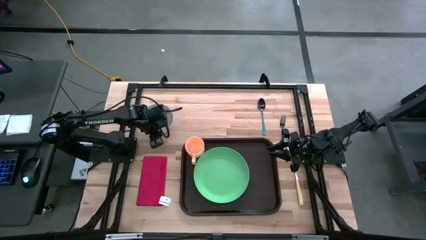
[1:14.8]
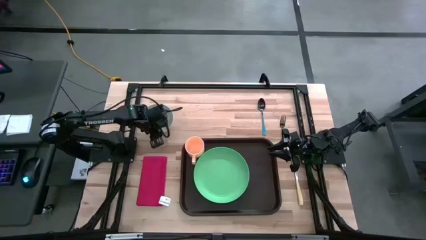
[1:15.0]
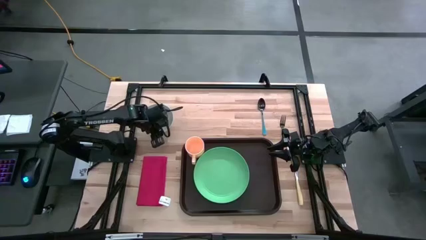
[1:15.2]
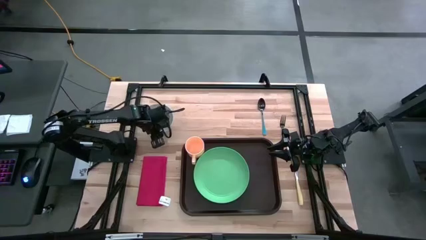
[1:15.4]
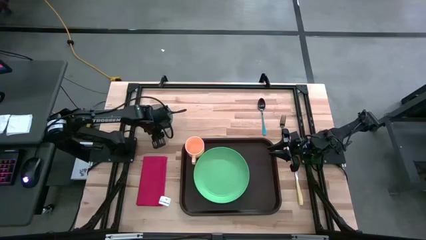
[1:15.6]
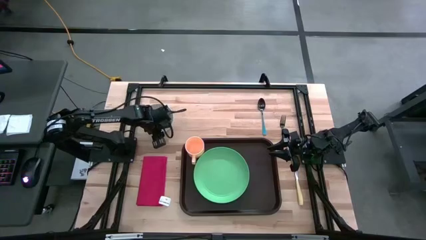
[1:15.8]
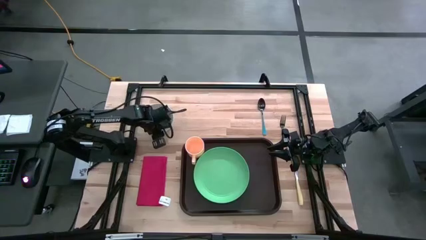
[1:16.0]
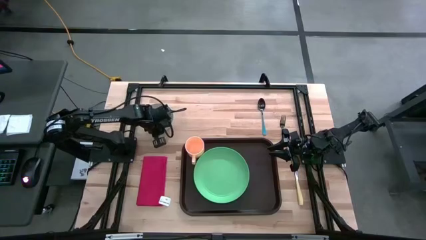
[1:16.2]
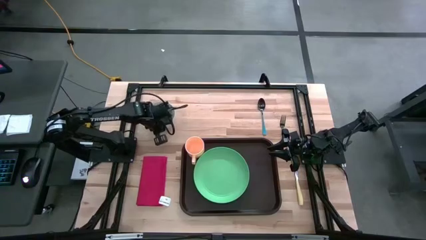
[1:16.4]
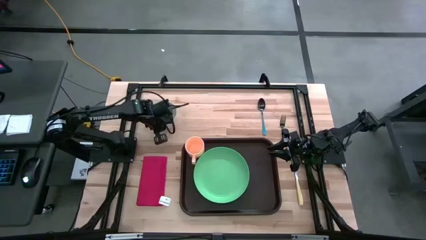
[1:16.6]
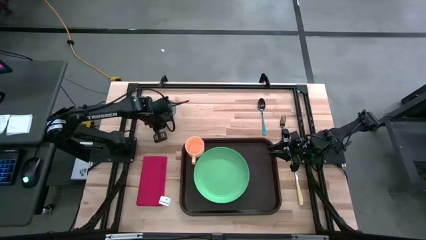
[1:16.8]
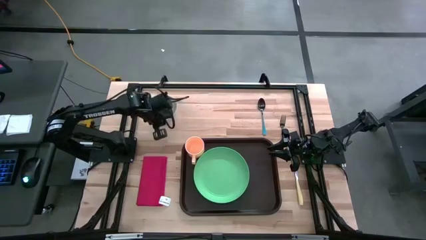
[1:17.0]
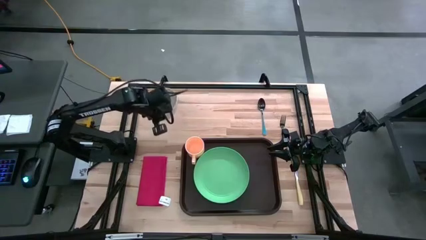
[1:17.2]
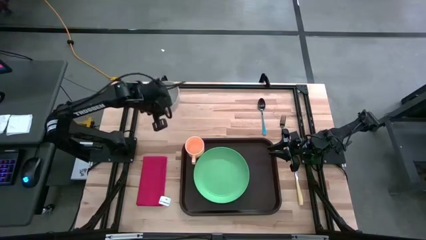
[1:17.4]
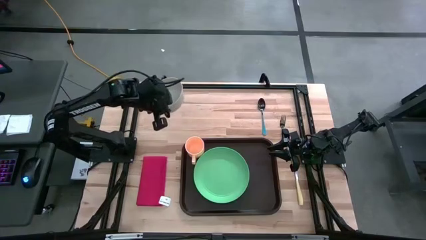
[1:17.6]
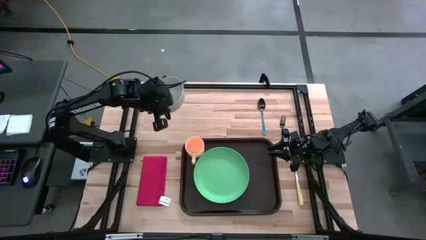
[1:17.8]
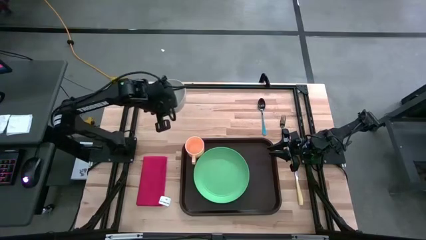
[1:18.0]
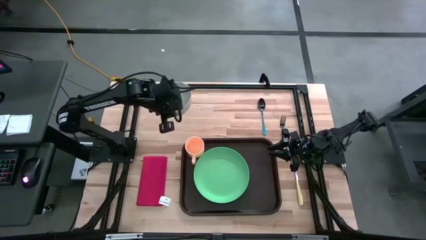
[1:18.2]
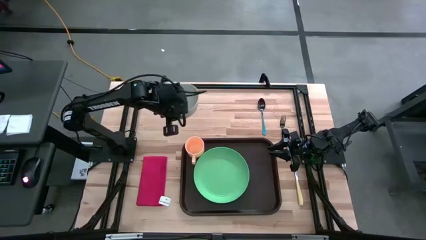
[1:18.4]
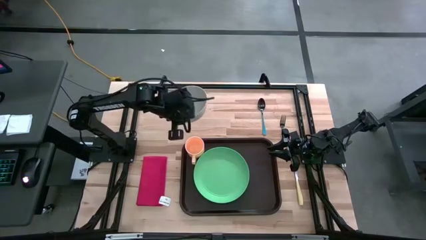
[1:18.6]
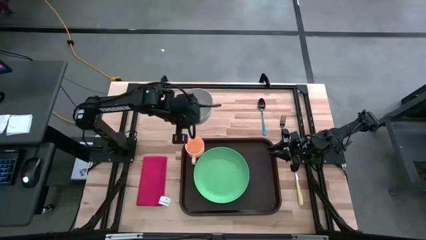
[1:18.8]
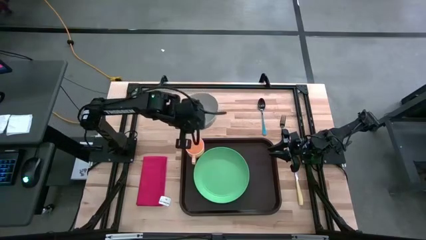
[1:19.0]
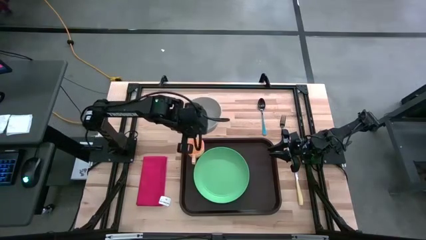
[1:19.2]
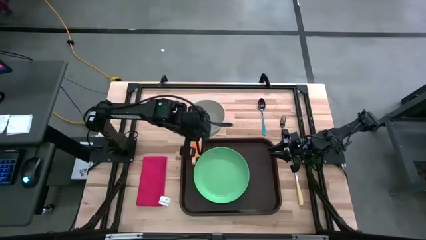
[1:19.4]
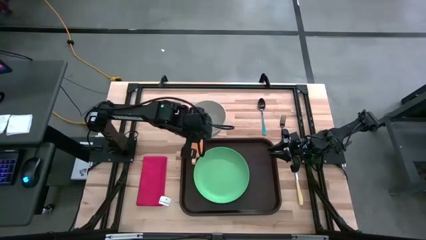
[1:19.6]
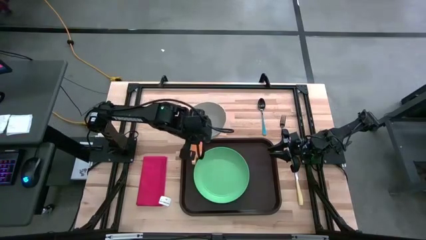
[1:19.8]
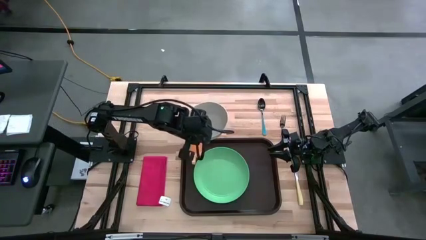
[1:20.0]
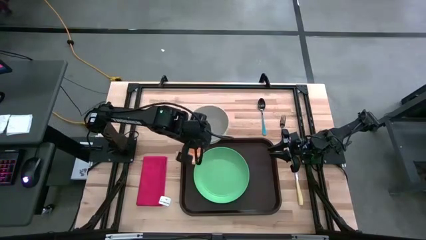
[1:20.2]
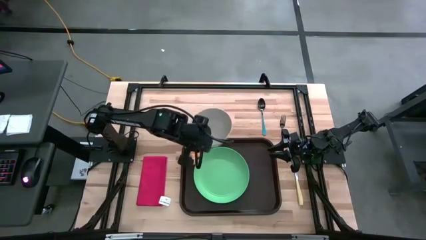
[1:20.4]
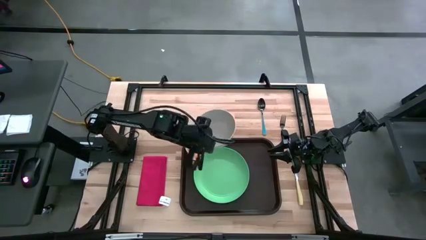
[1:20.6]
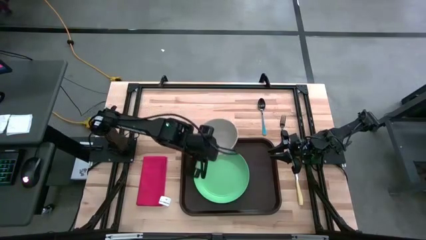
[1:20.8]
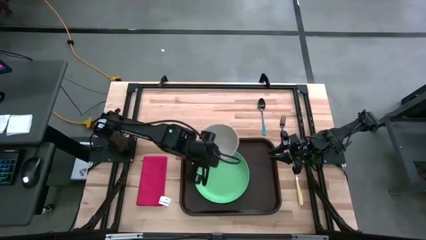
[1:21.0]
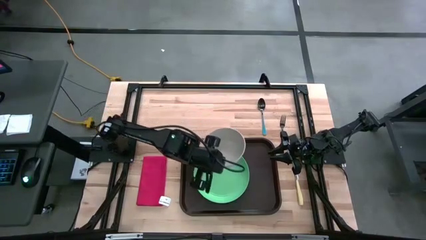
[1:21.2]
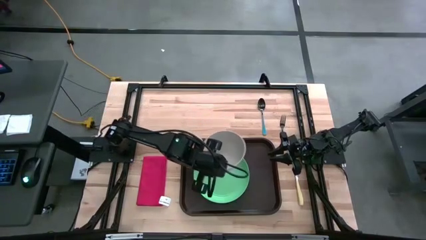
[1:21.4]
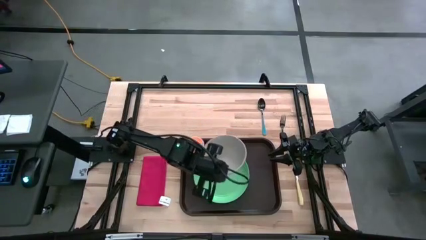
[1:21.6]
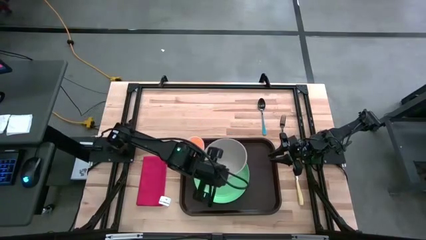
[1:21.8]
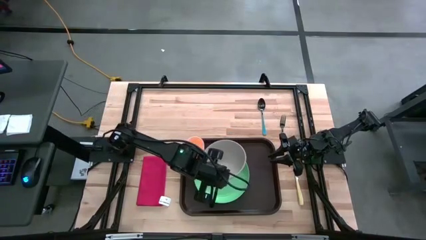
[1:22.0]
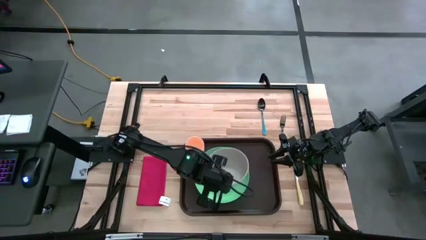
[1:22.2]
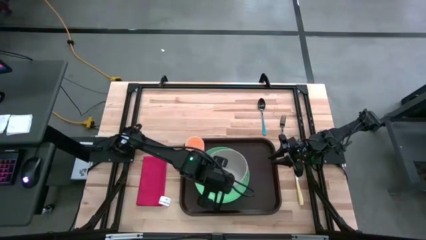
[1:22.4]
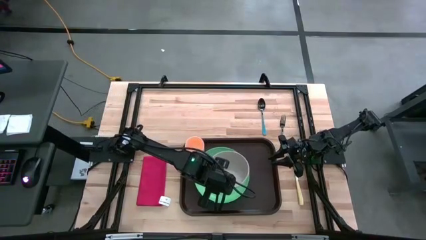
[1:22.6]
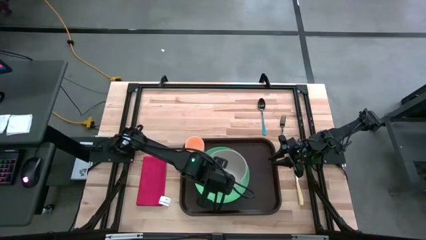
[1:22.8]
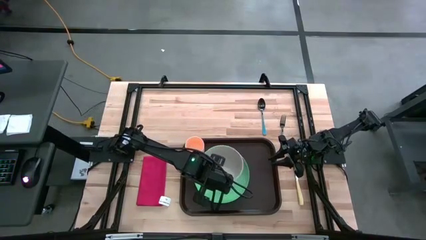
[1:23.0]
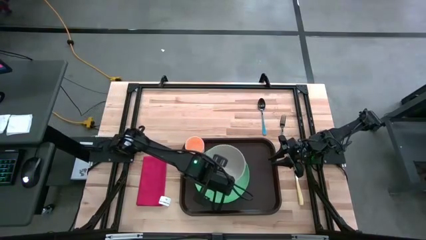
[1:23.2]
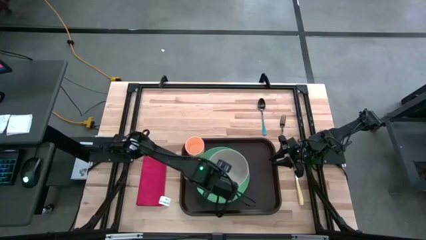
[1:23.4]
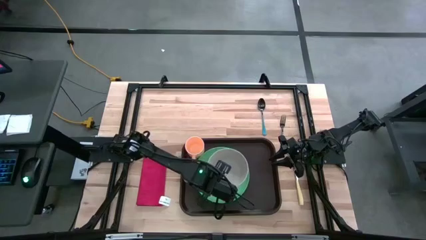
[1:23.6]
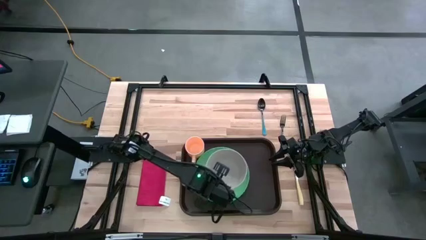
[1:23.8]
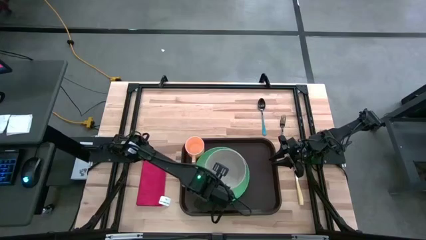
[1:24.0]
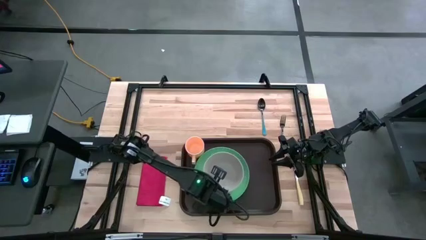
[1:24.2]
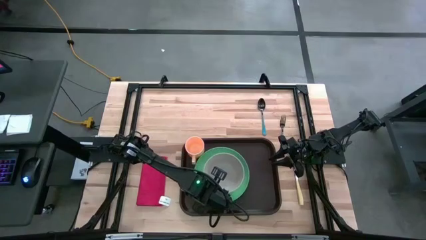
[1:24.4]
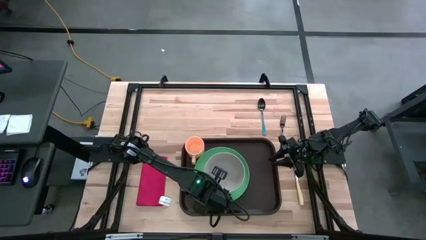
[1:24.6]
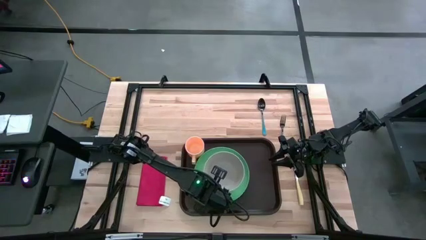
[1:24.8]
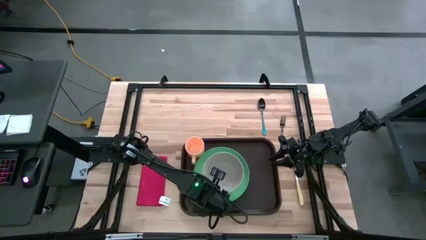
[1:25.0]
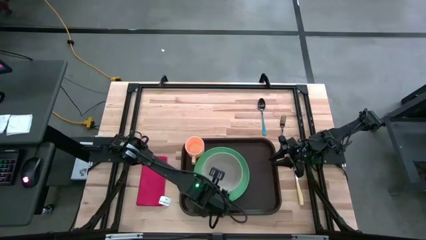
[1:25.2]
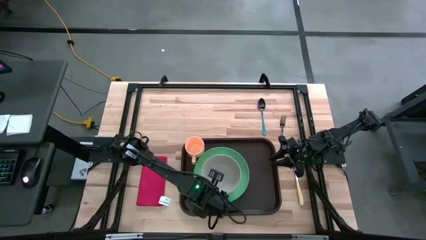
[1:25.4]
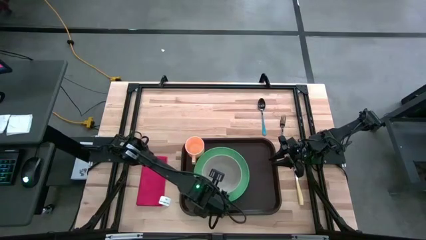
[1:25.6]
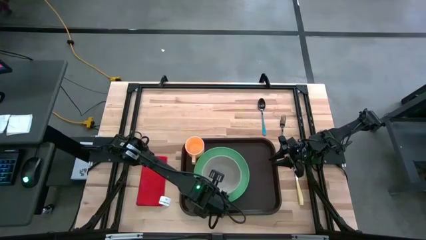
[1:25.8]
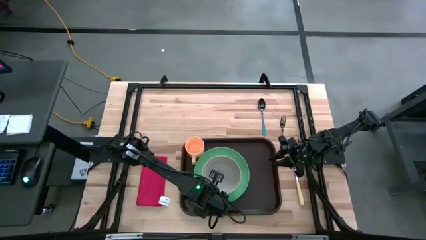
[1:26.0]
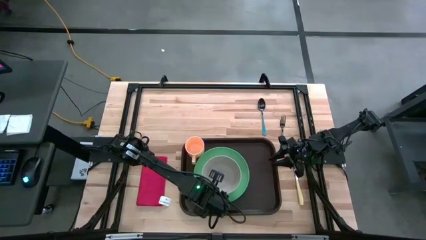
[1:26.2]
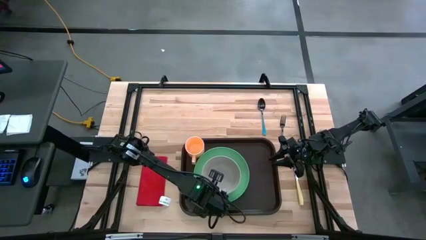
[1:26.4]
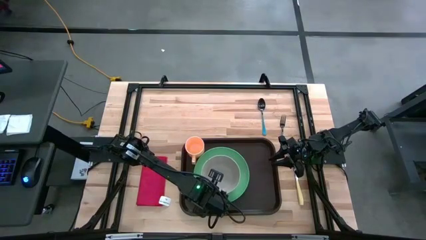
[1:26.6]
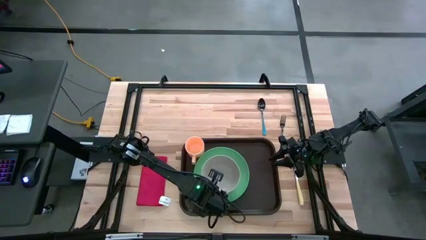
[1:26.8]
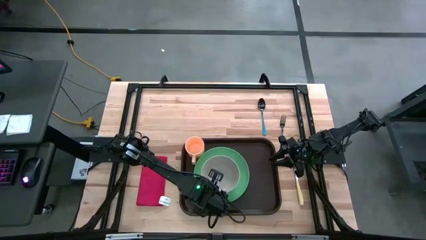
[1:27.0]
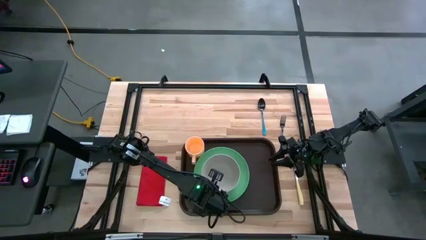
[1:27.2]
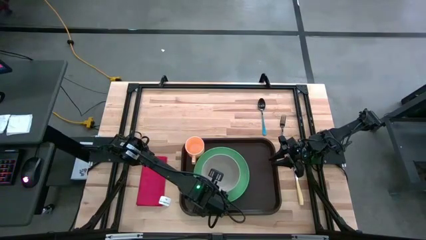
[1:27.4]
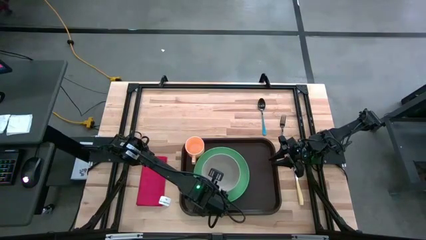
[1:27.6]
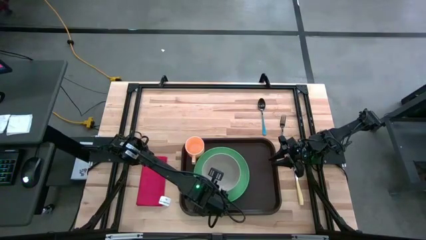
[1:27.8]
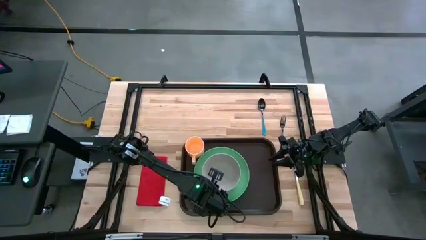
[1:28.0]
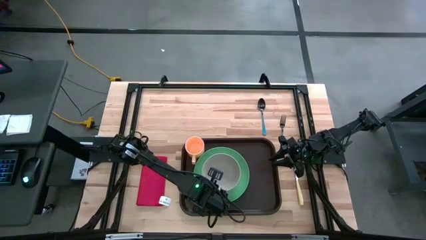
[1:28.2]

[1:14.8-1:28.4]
Task: Set up tray
Put the gray bowl on top of the green plate
